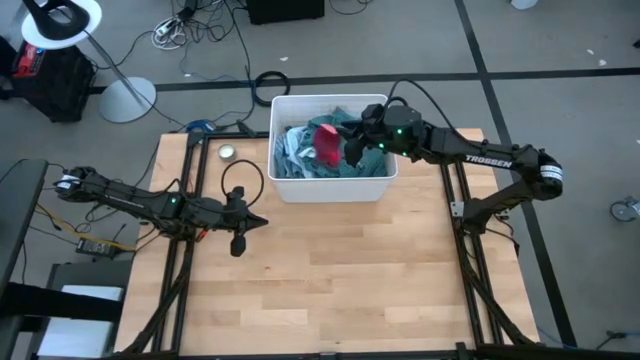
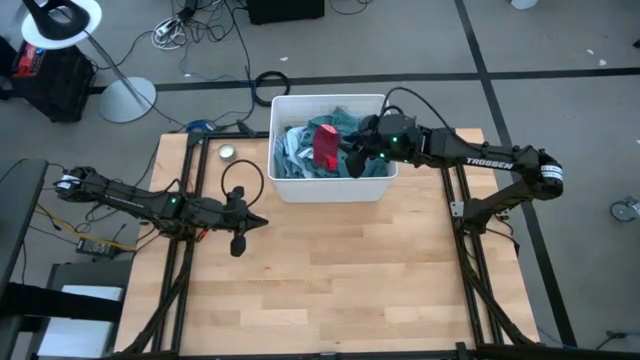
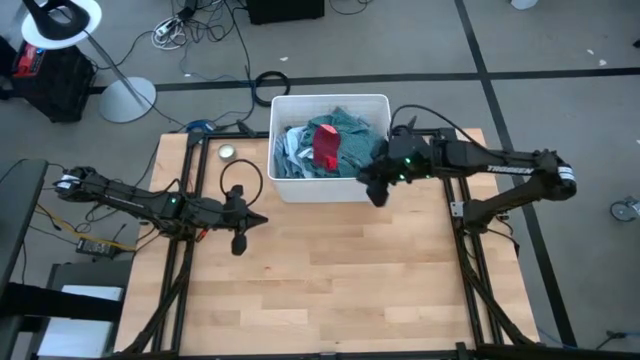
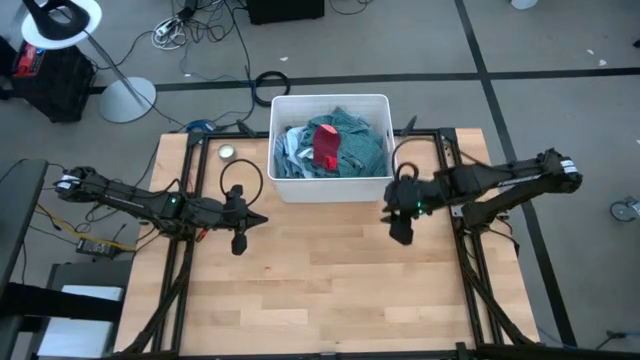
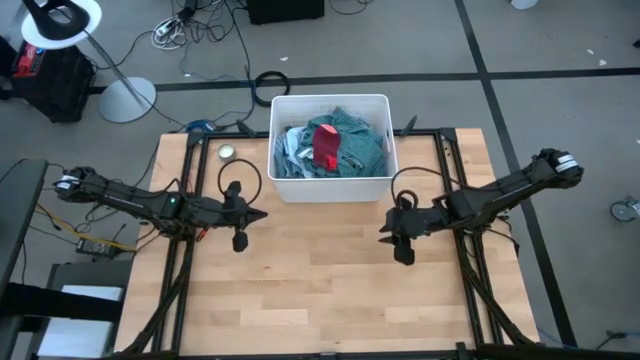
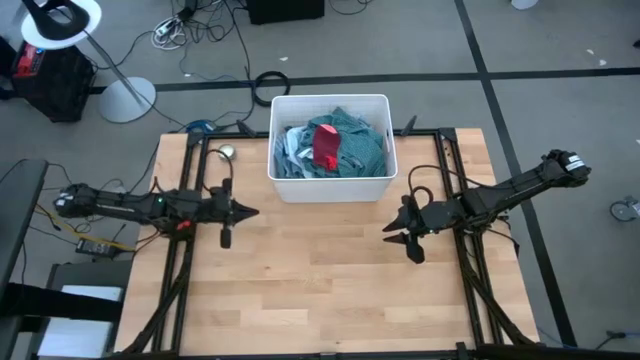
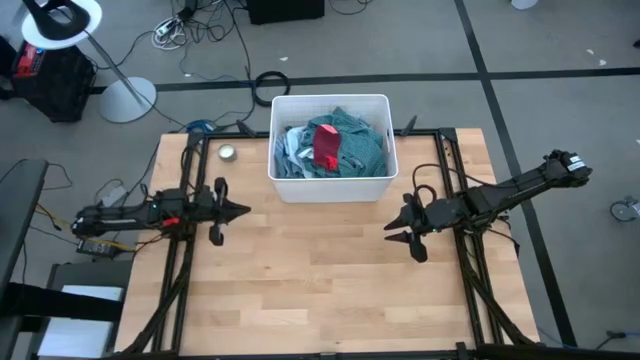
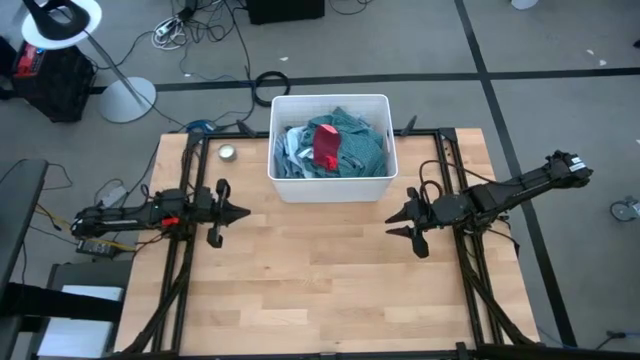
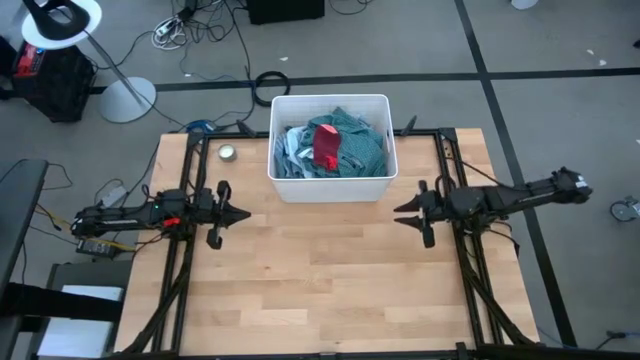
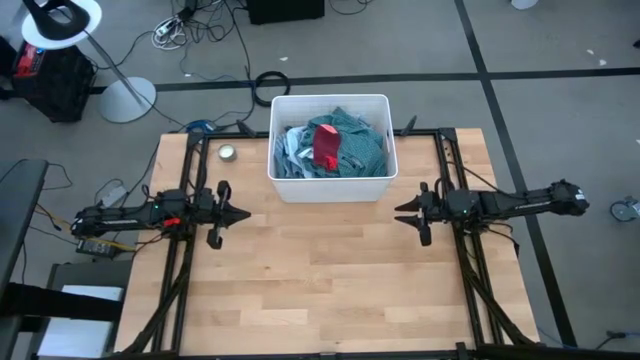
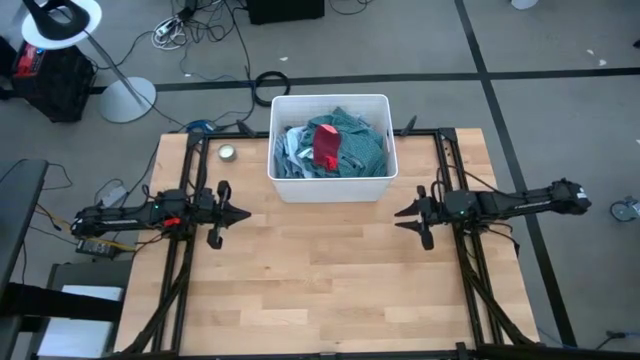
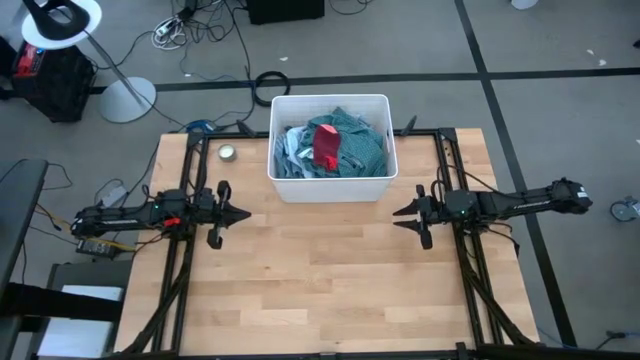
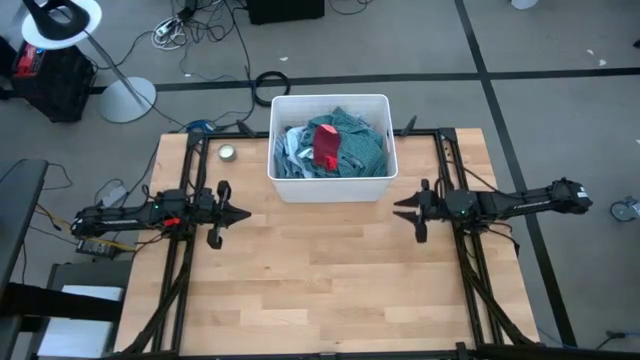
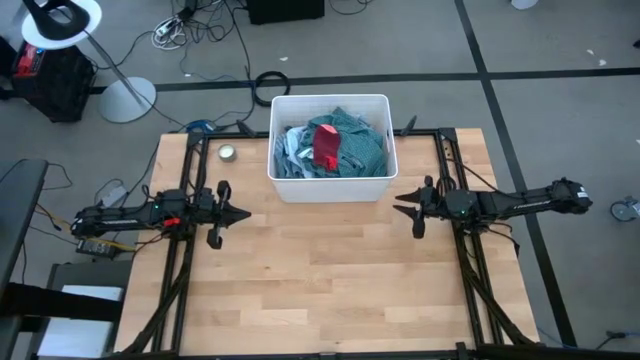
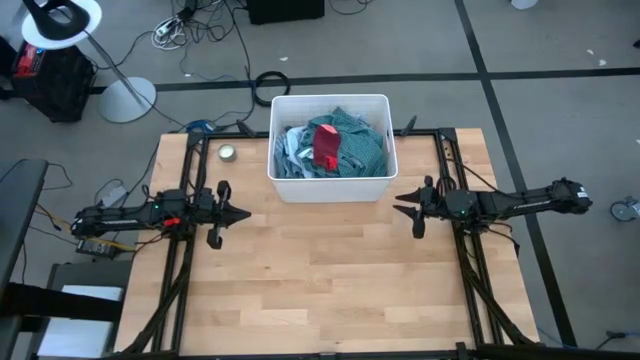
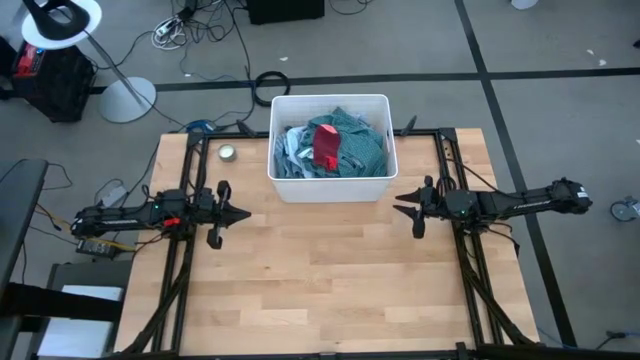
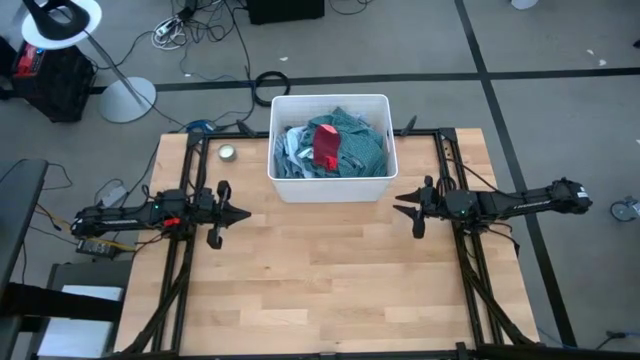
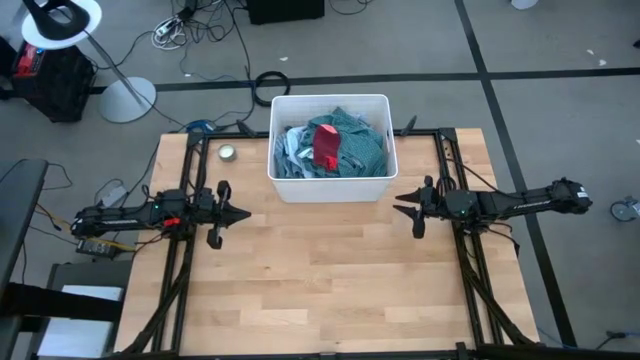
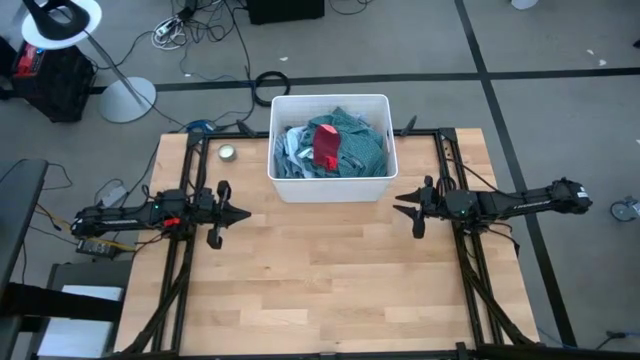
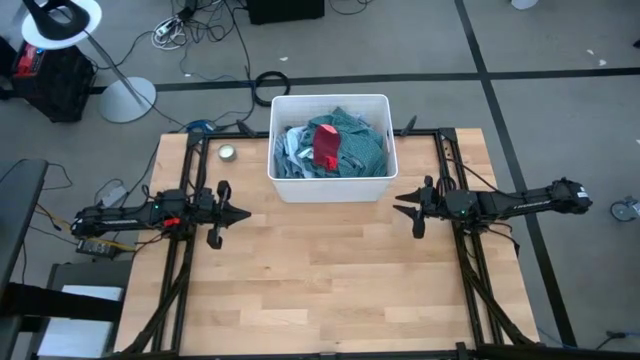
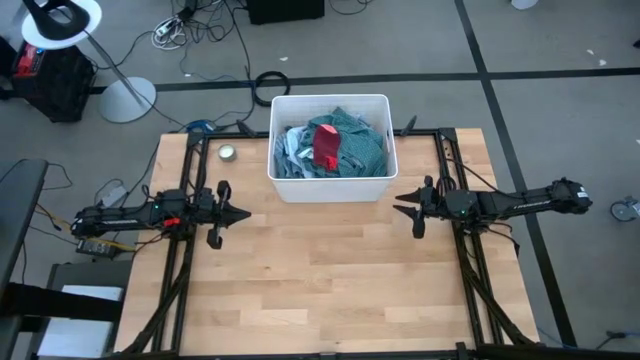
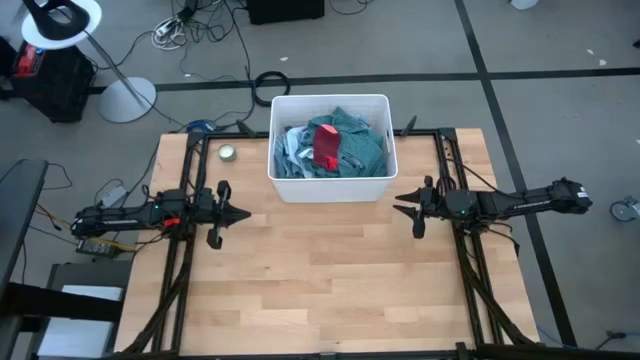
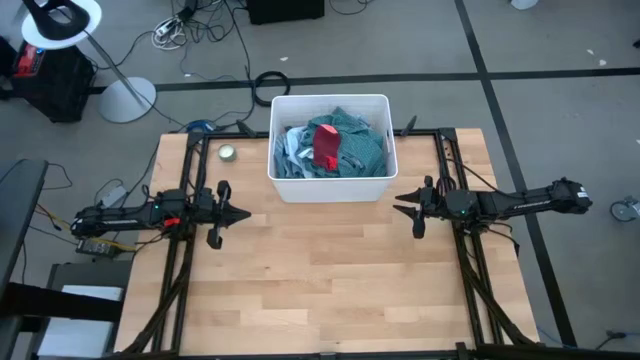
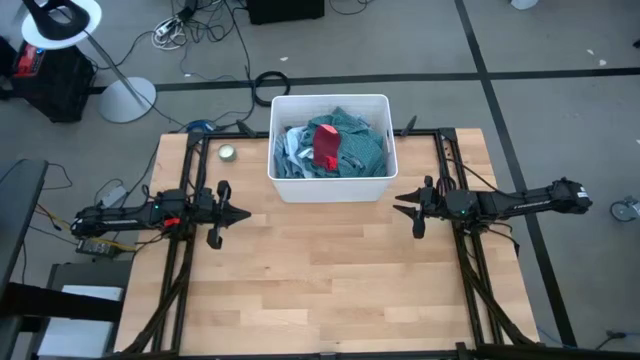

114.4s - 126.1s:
Task: Sort clothes
Return to Home Position

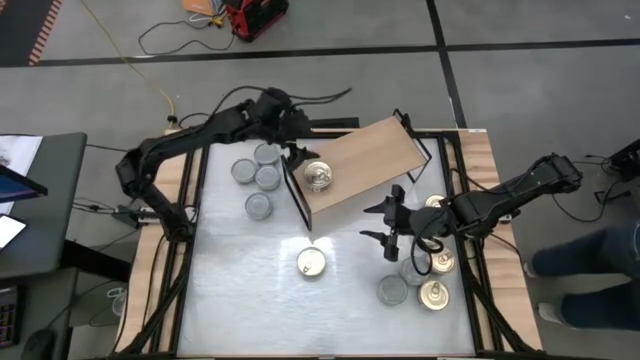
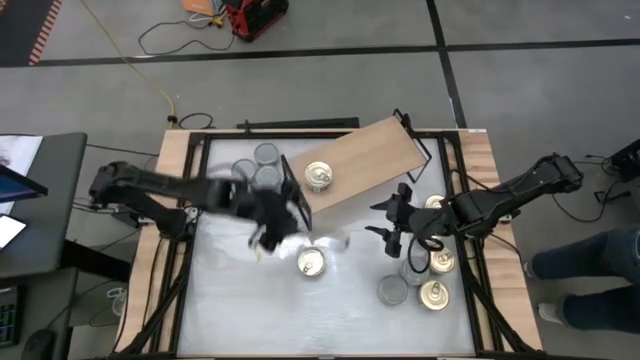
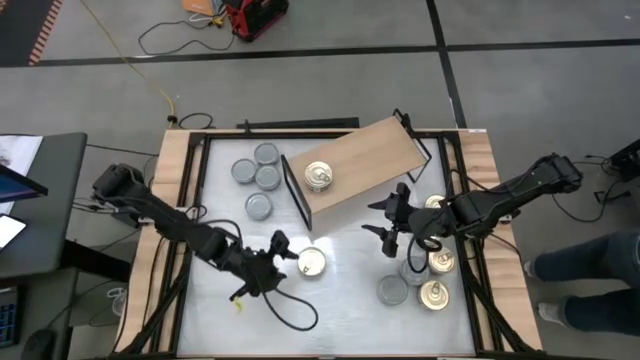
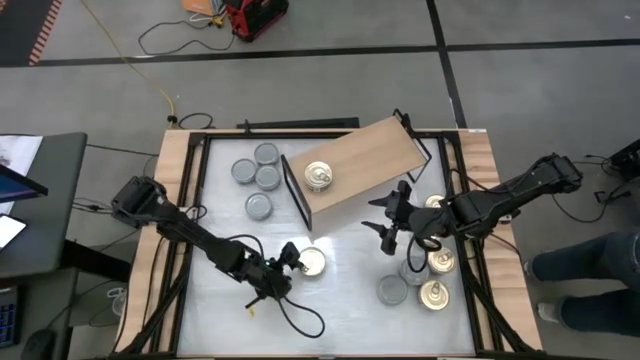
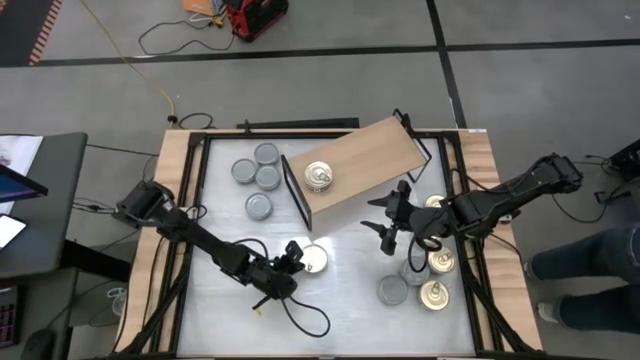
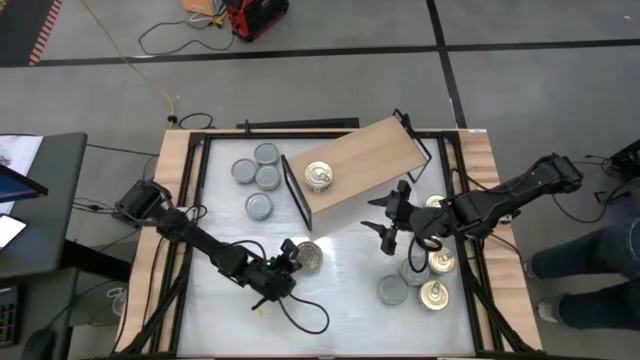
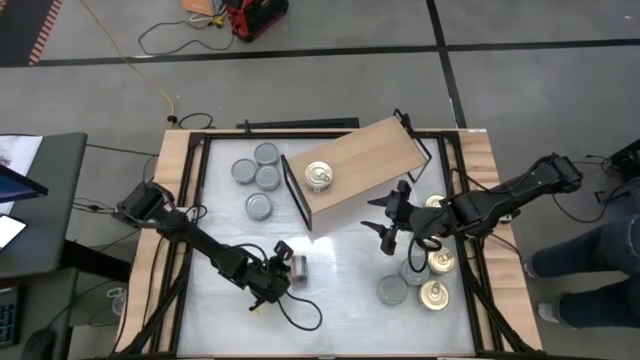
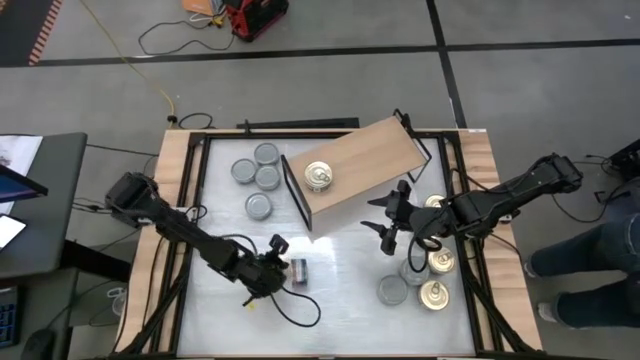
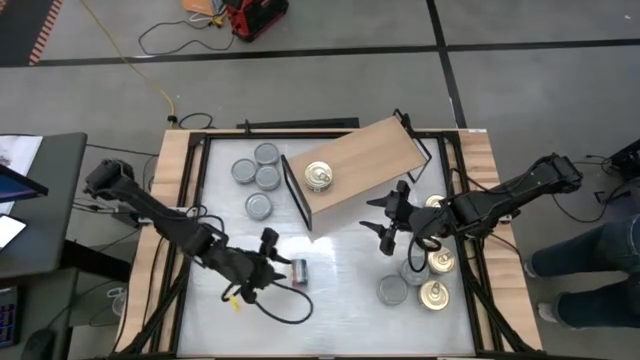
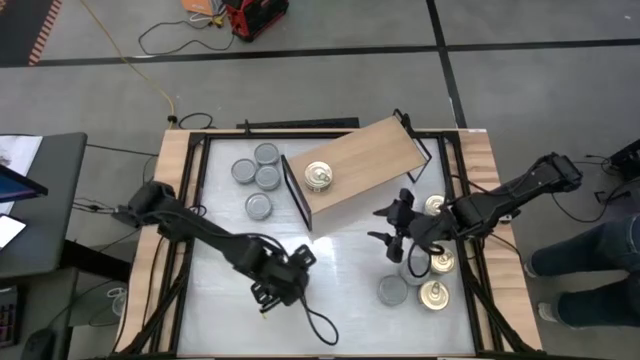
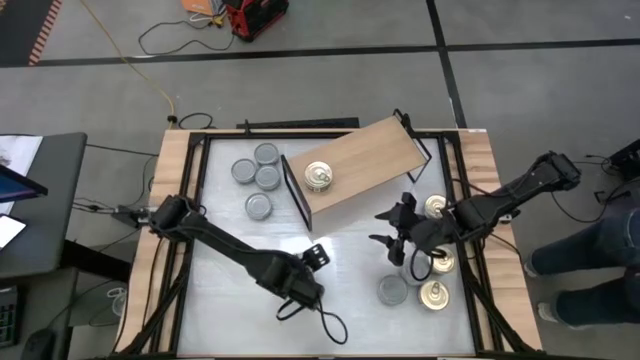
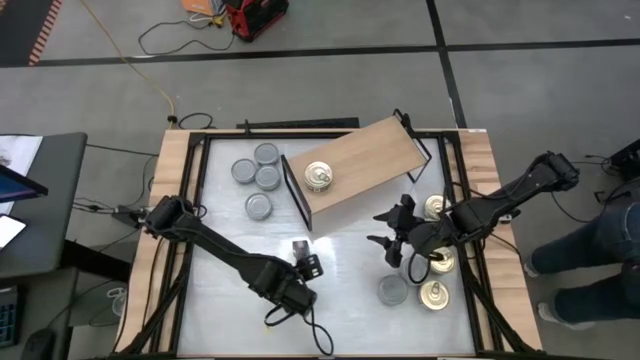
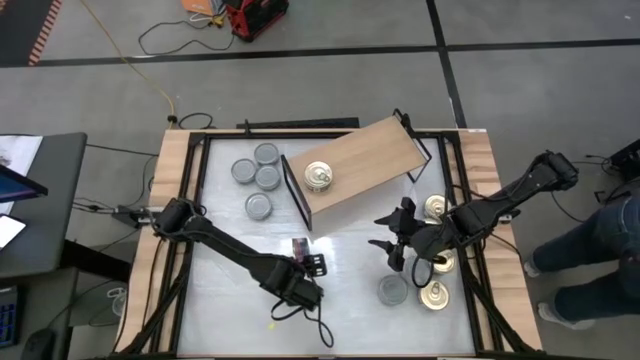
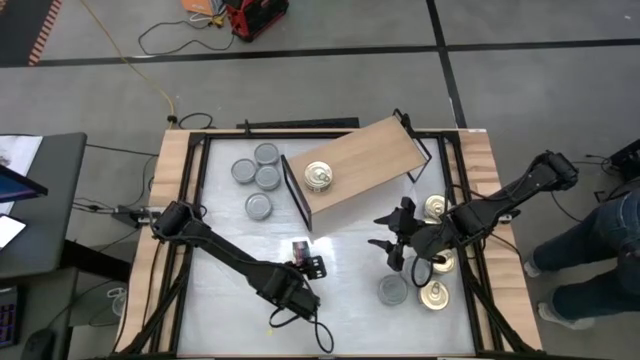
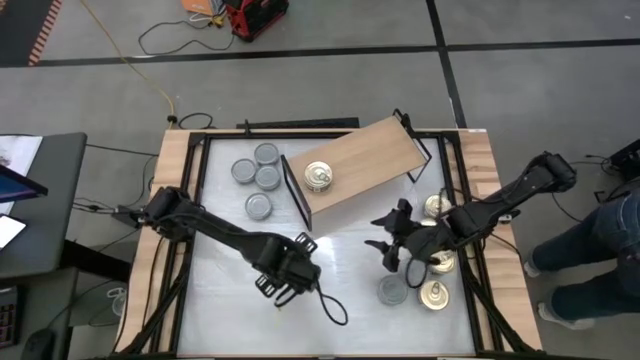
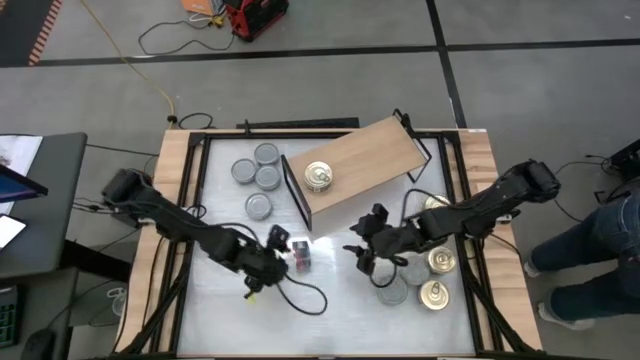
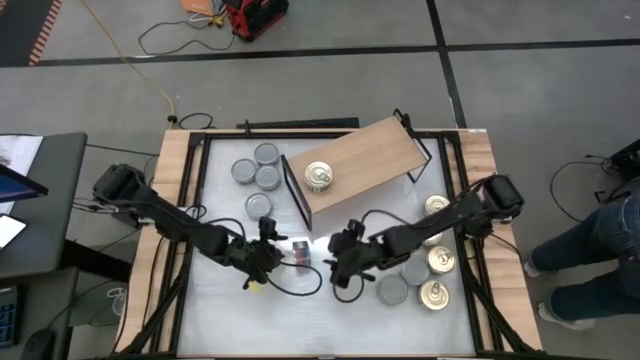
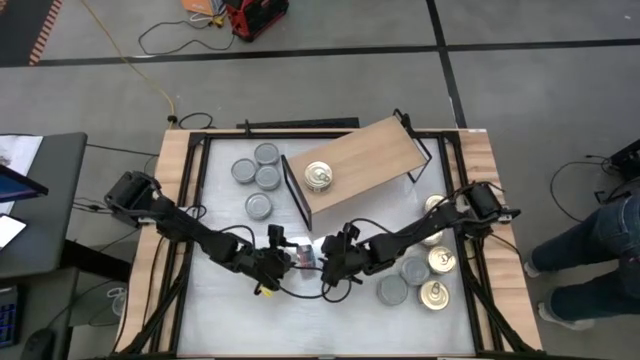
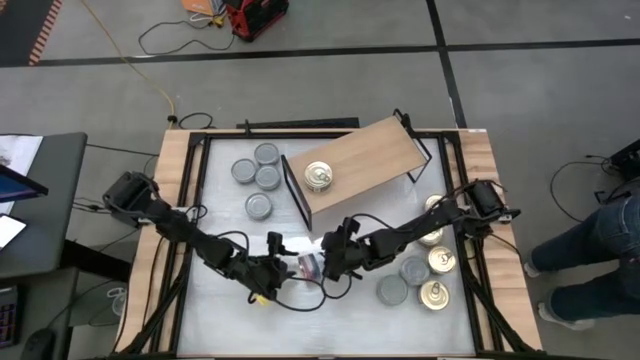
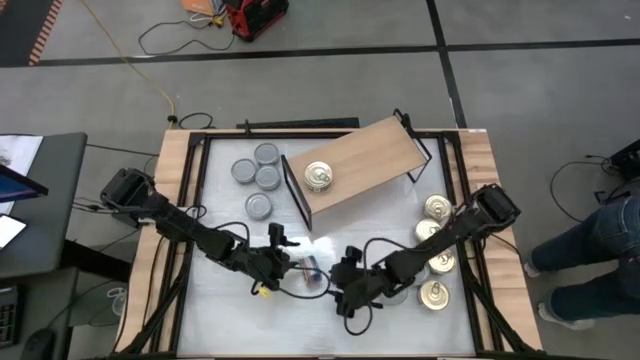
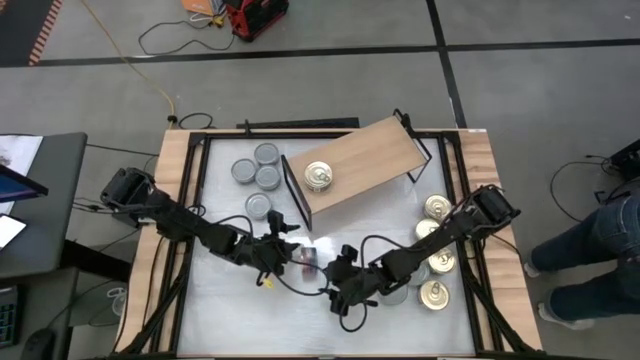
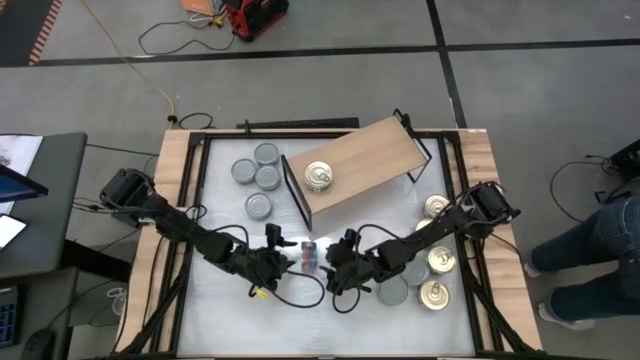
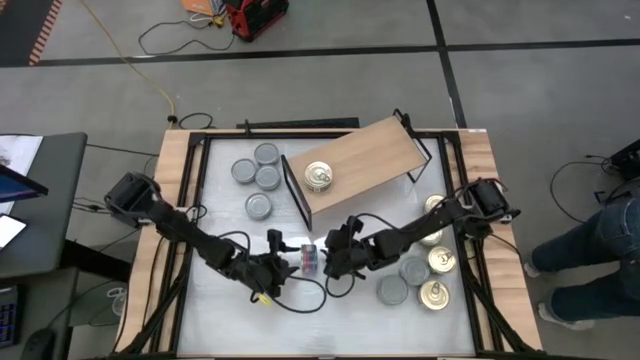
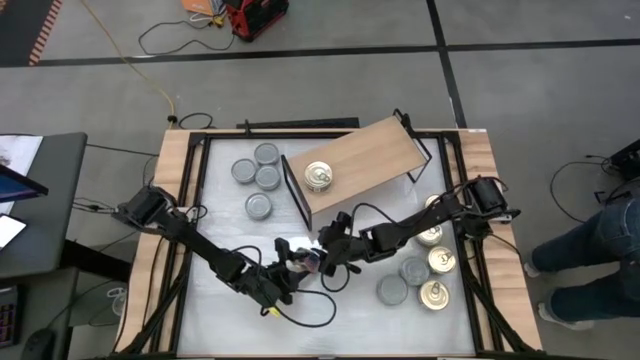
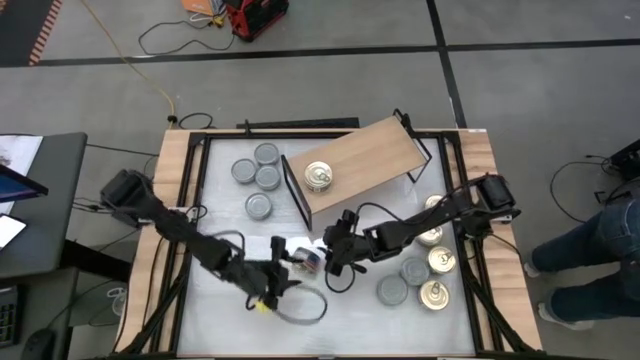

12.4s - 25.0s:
Task: Stack canned seafood by type on shelf
Stack the blue tuna can on top of the blue tuna can
